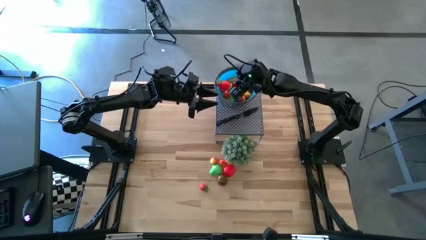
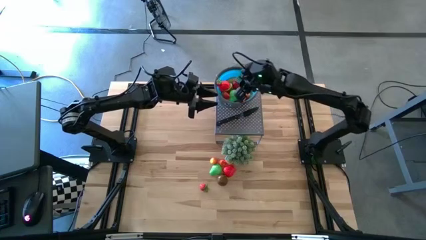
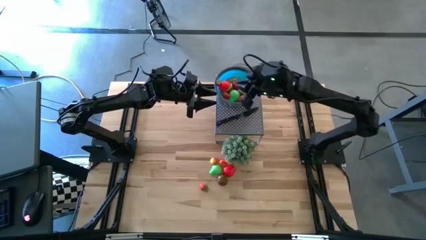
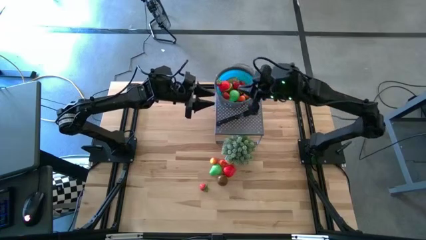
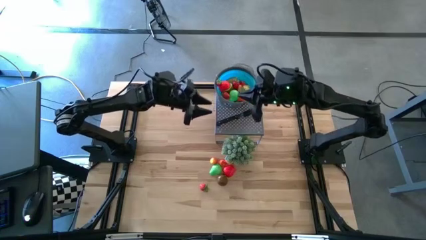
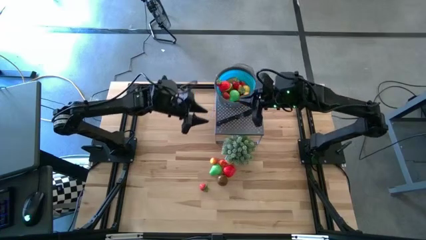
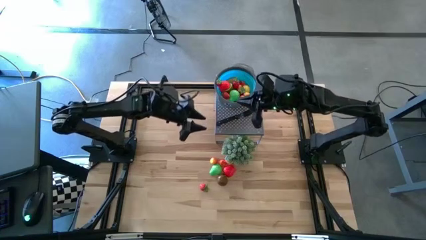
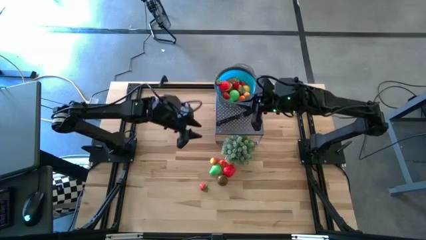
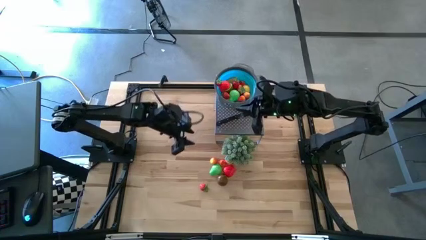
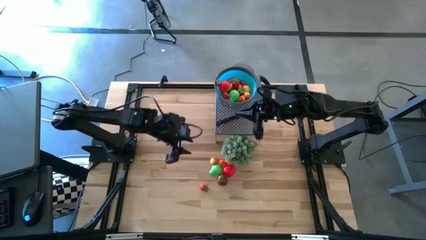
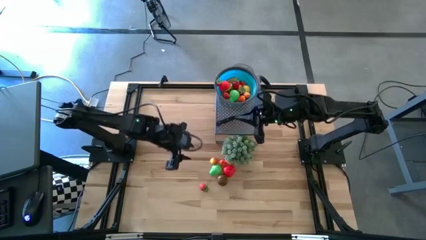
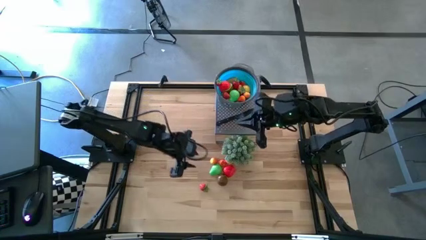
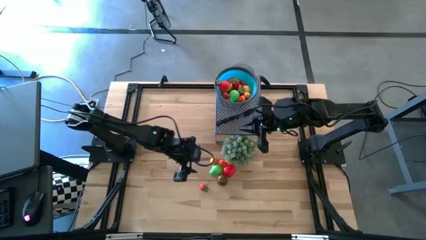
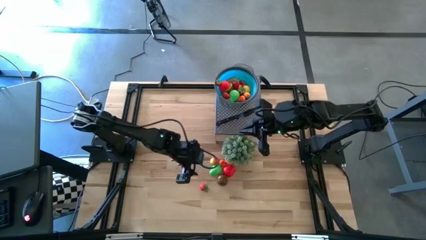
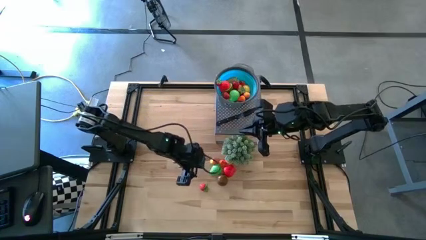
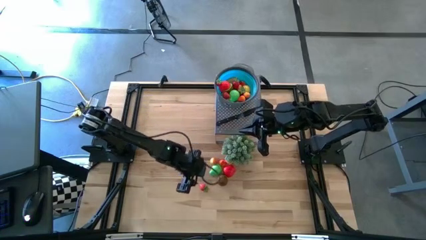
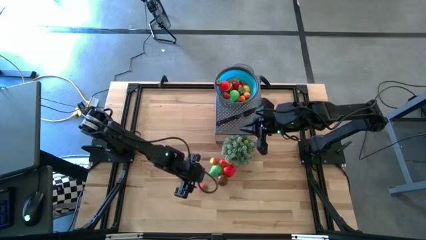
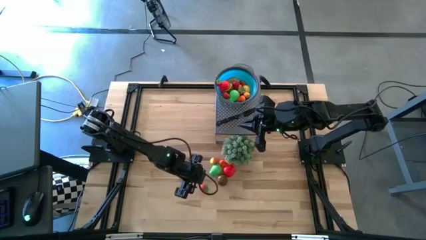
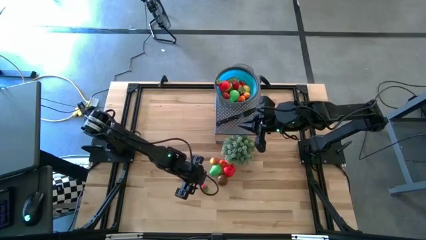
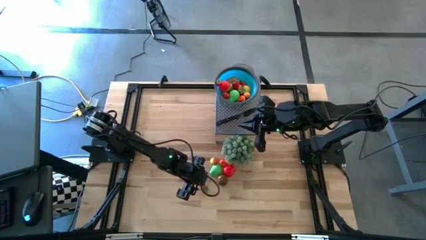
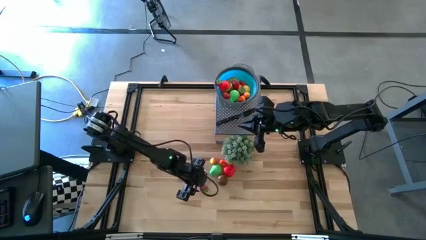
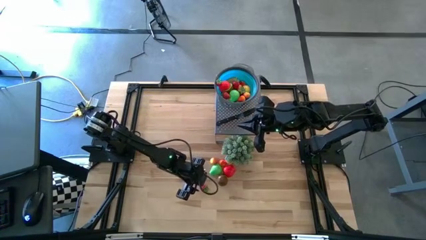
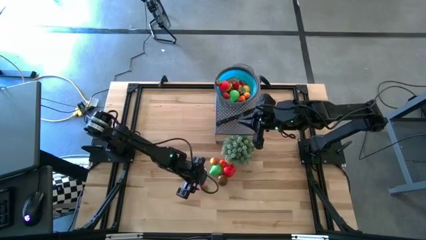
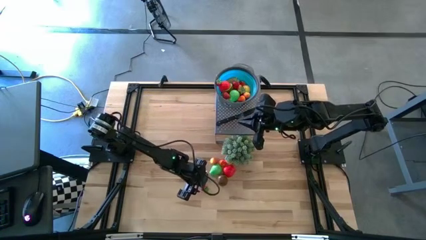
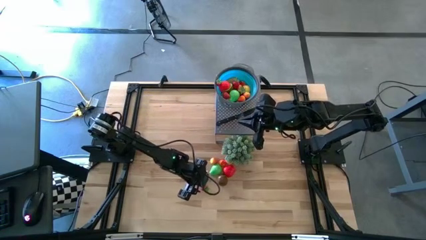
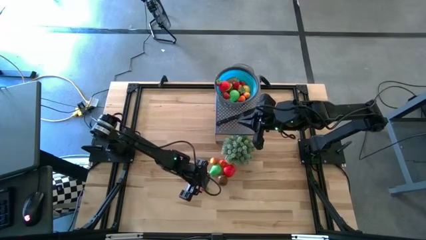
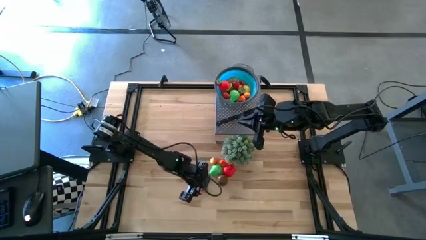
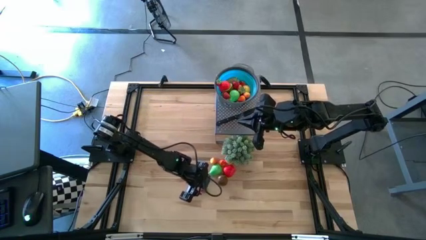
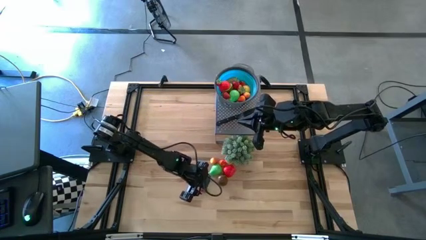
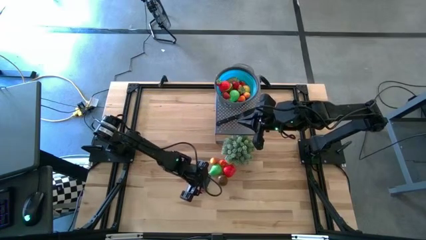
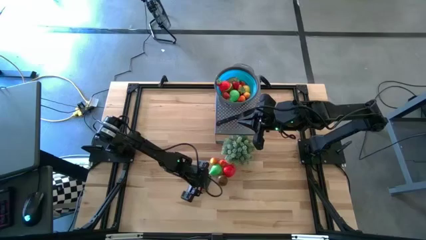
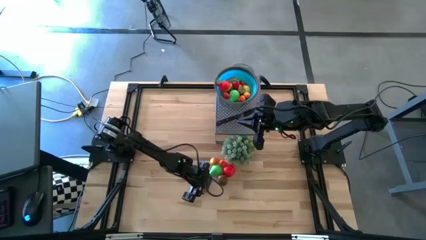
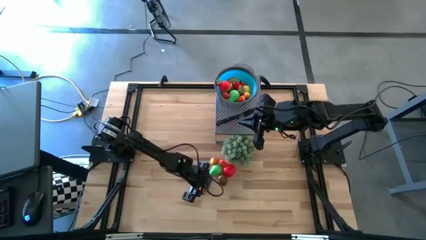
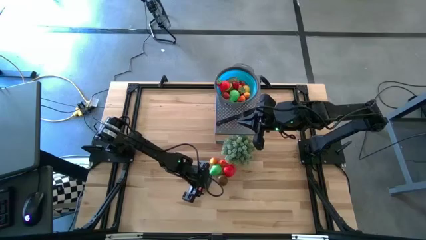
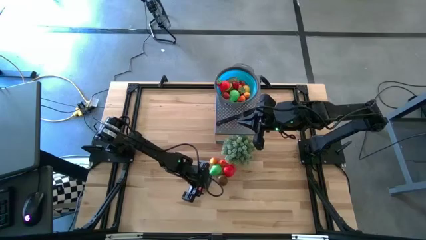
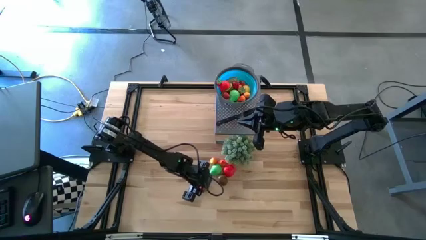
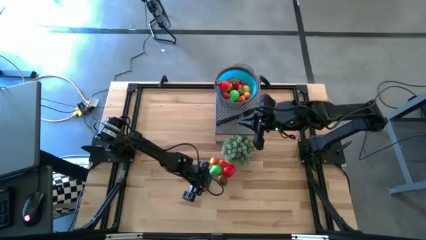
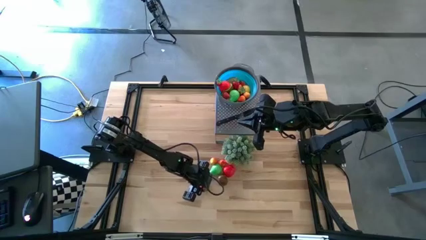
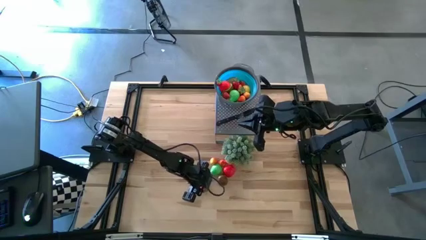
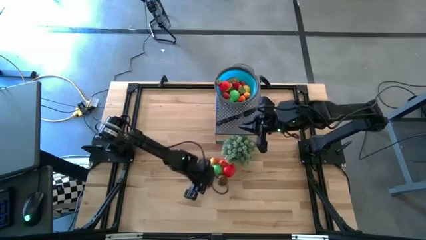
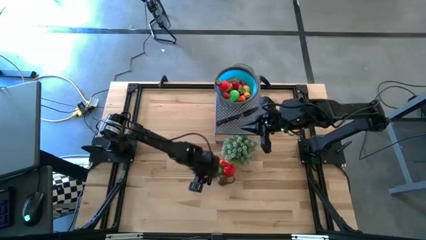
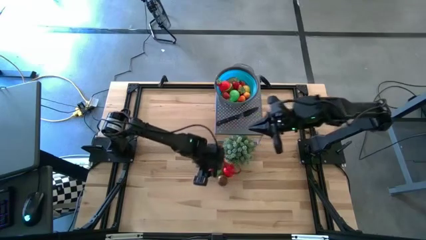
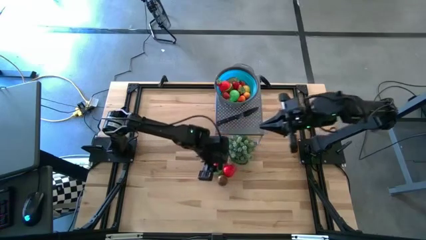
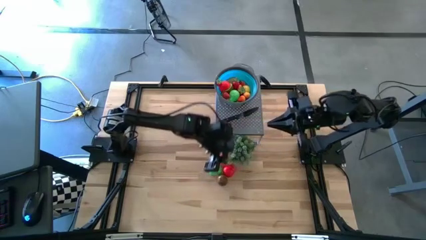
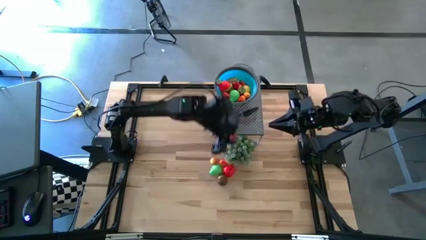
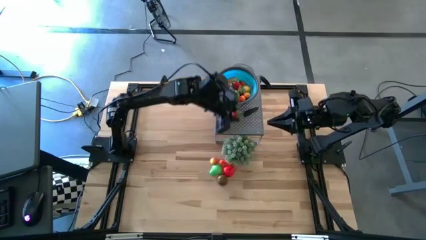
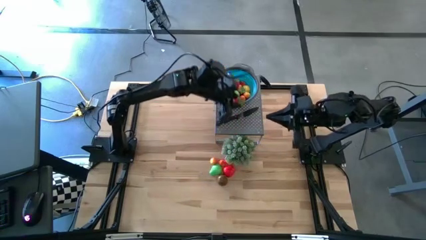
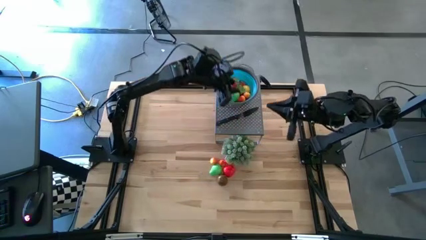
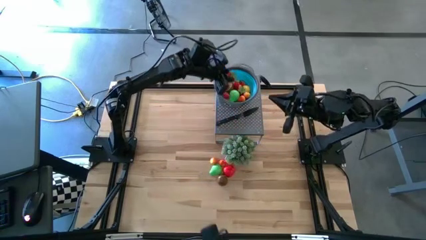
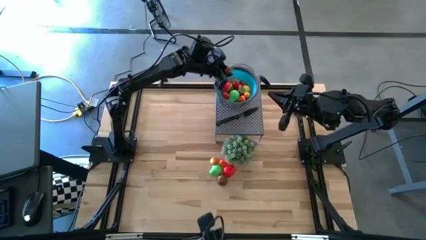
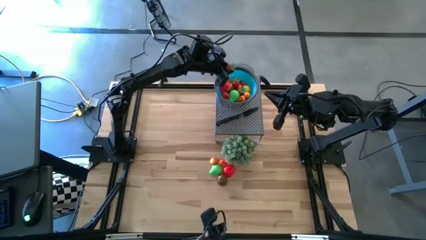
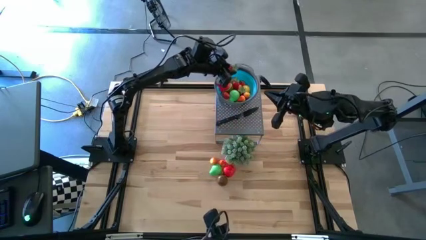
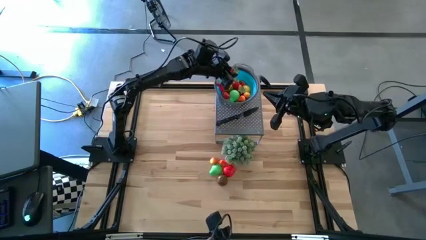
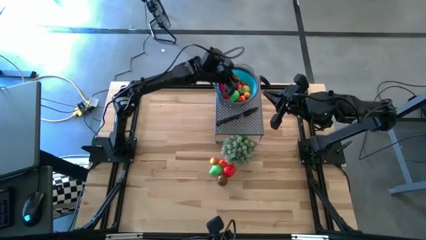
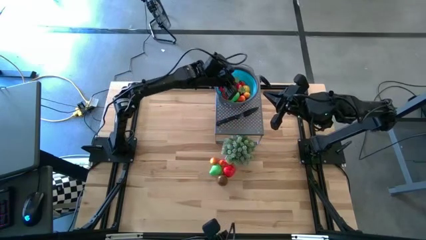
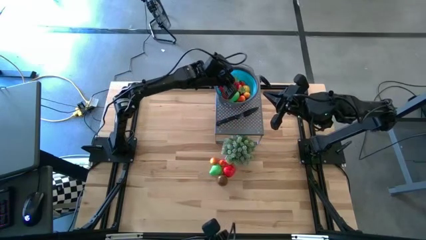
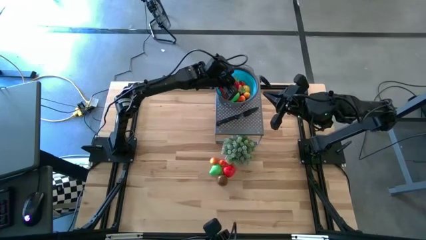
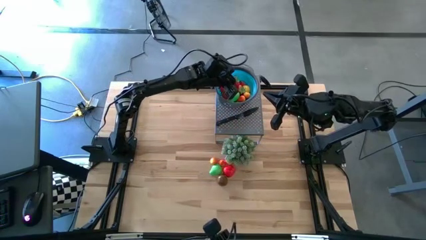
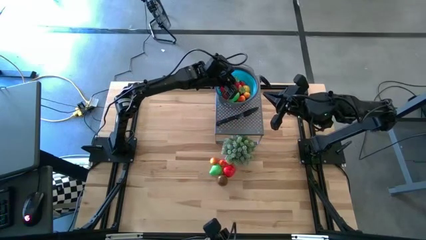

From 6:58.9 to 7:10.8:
Task: Pick & Place Fruit
Put the red strawberry into the blue strainer bowl

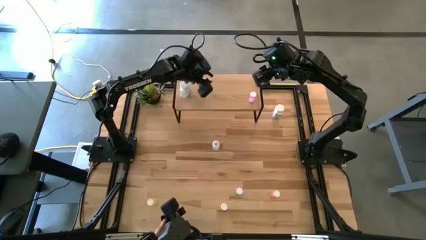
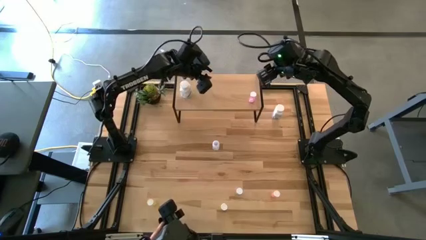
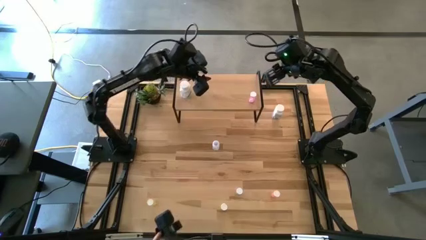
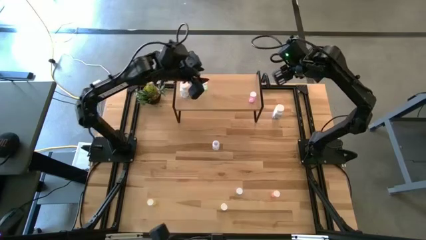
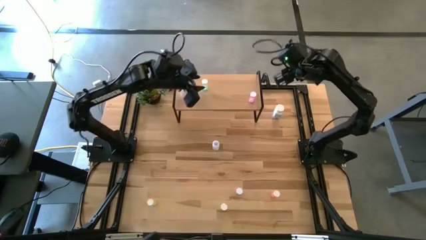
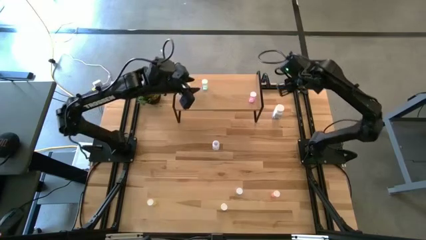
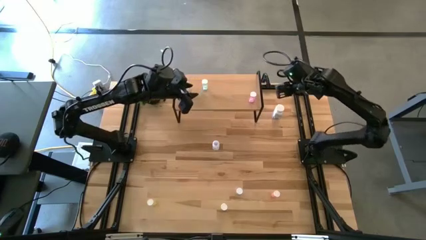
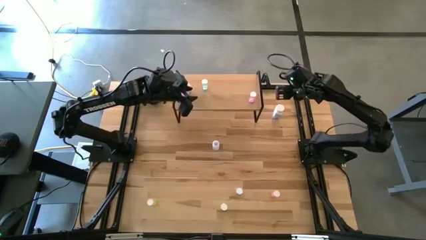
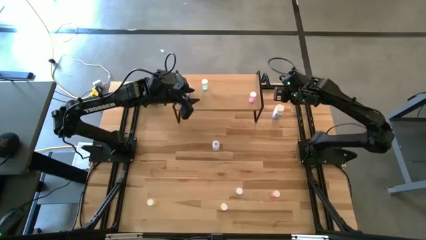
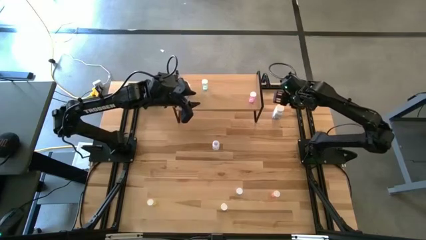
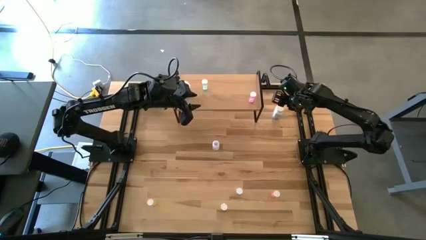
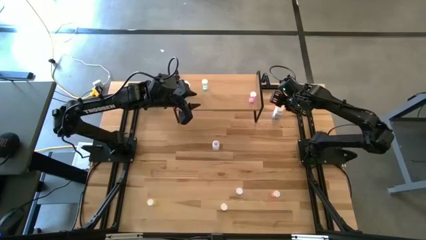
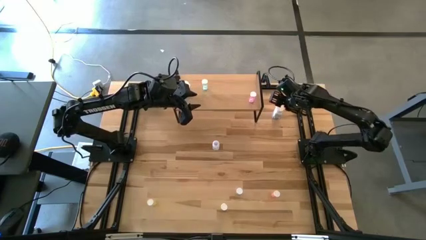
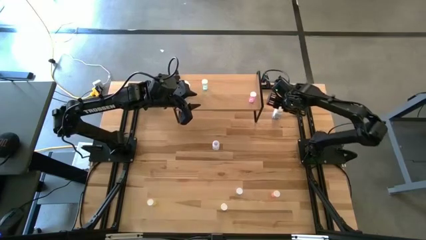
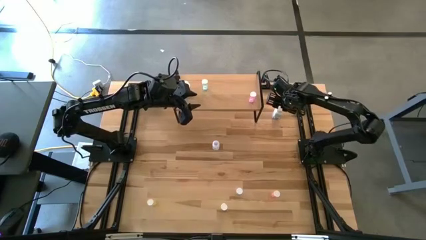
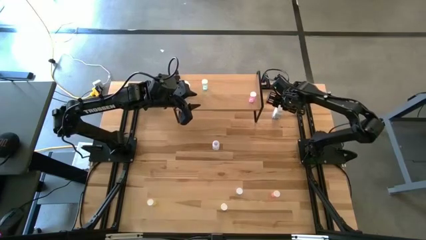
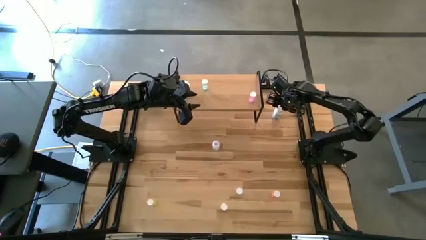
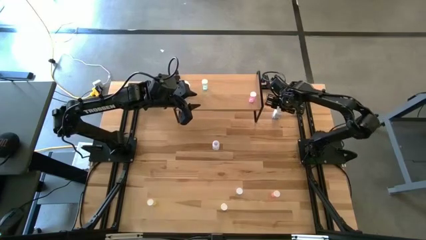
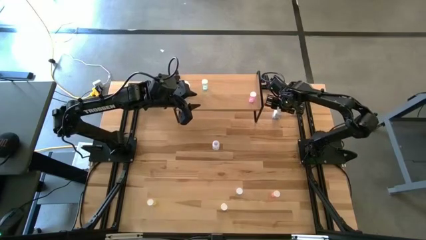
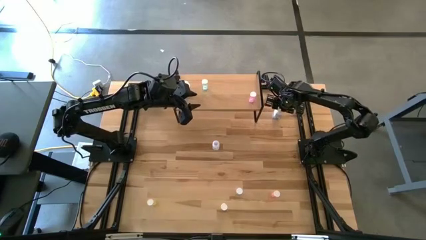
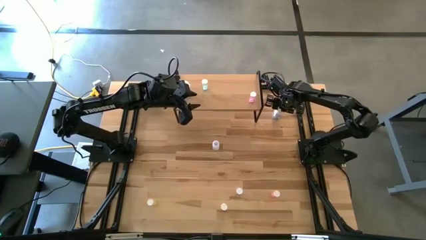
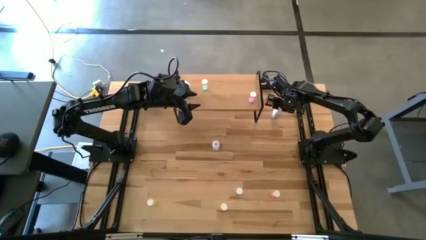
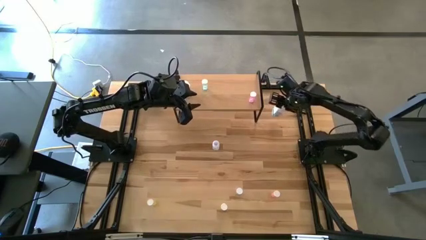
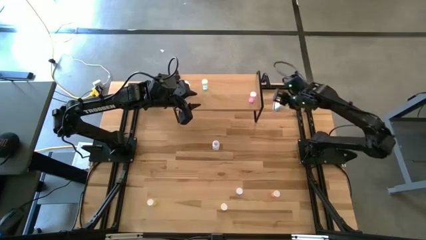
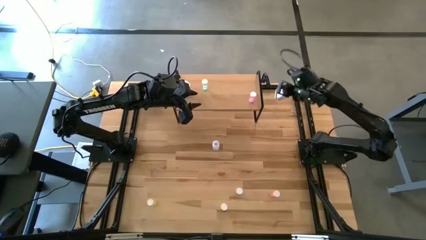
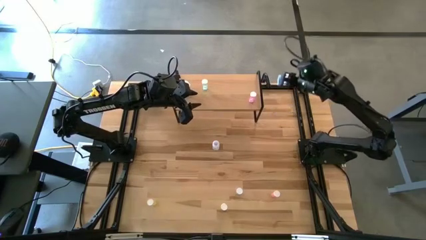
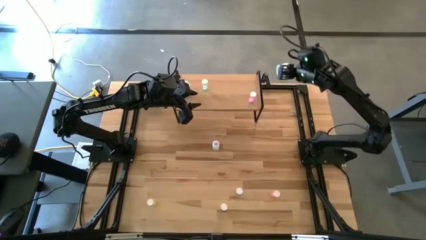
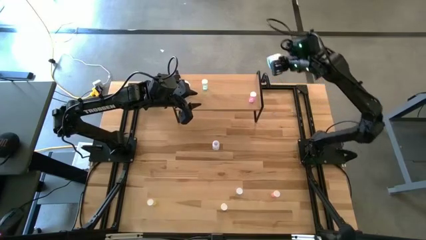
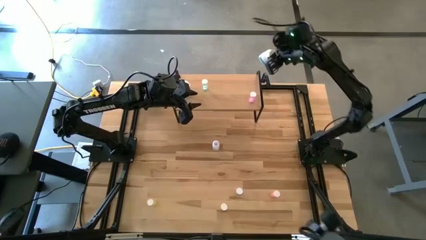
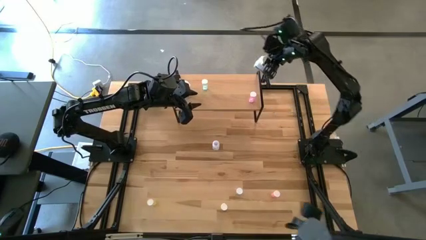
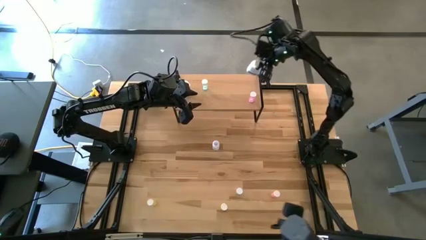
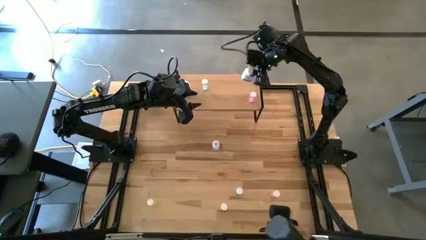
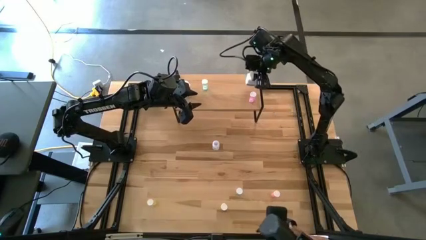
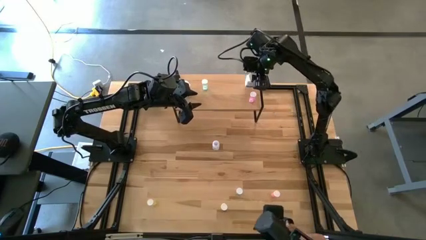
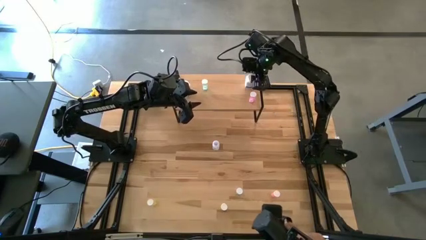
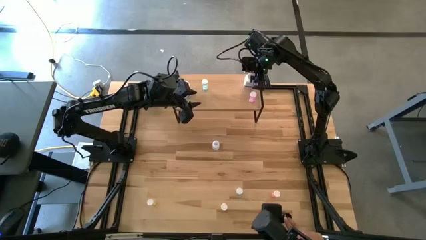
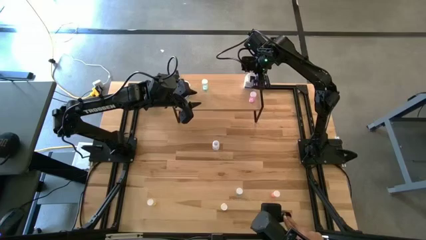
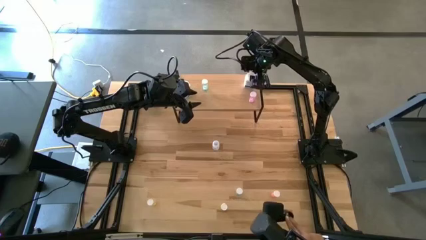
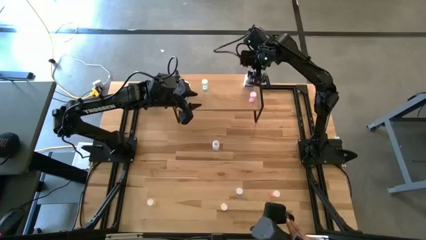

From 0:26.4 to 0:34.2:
Task: Pick and place medicine bottles onto shelf by color
Put the white pill bottle on the shelf
